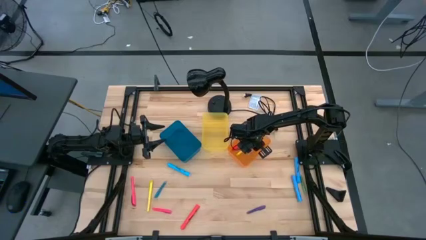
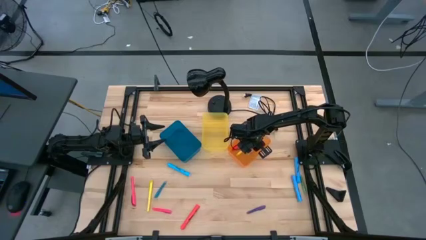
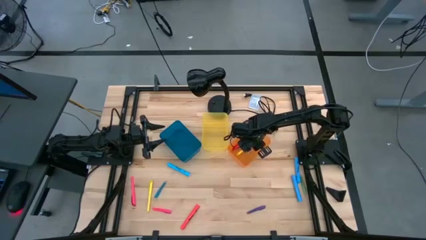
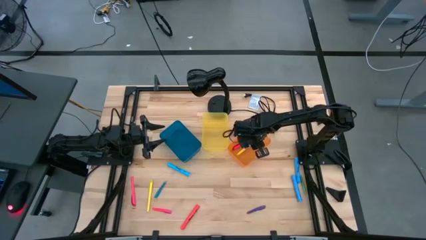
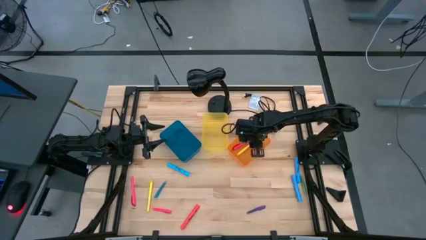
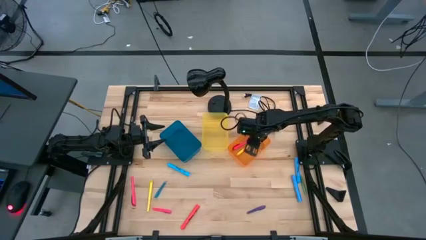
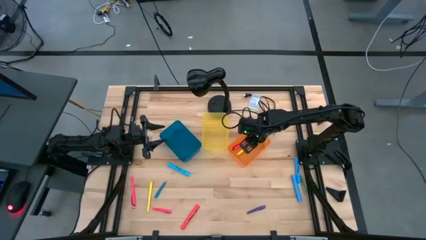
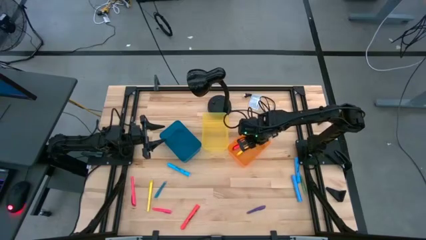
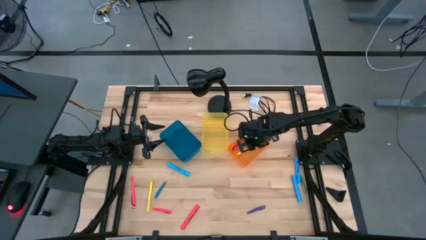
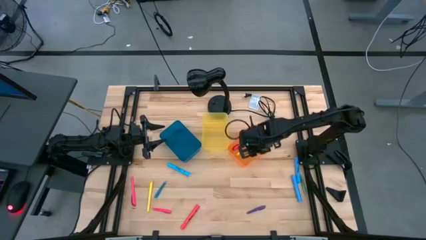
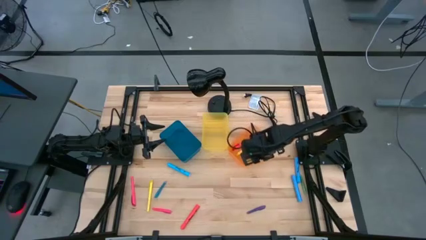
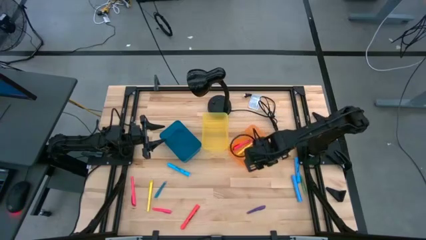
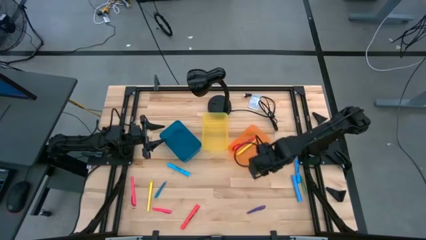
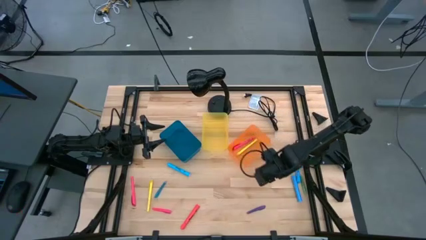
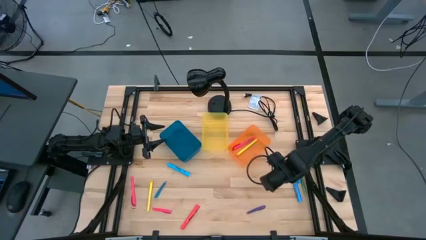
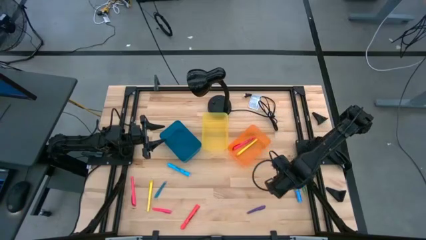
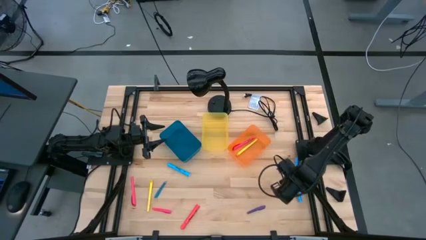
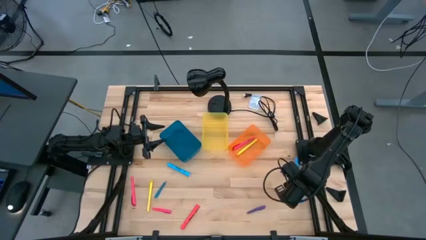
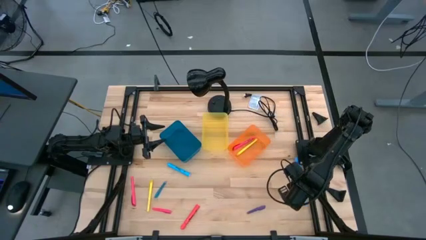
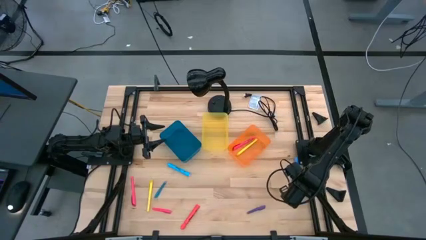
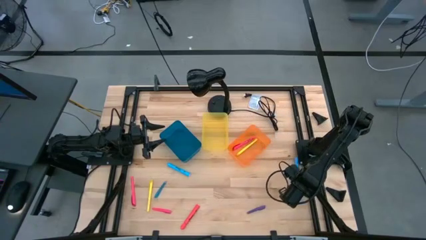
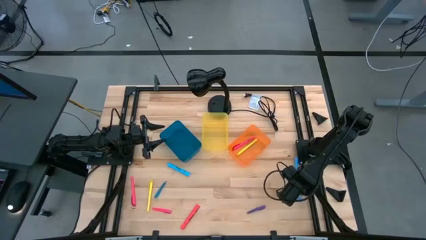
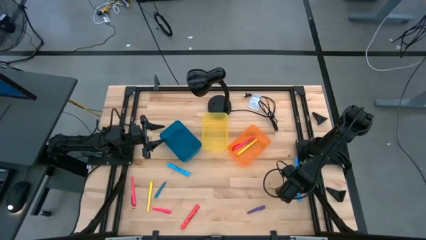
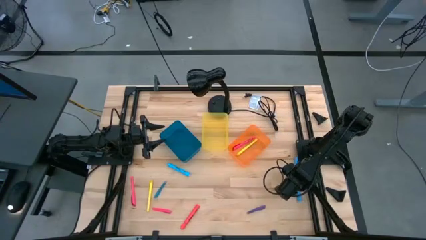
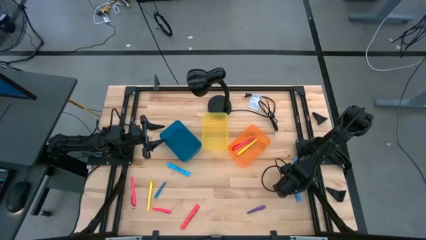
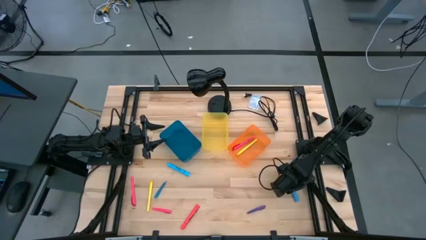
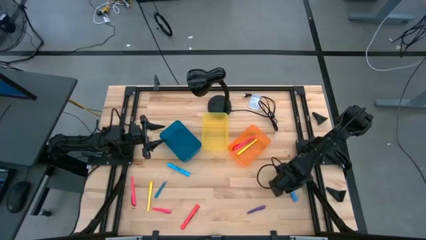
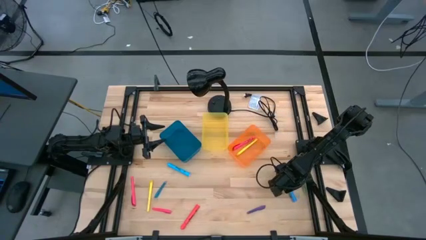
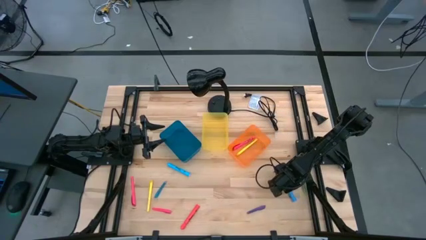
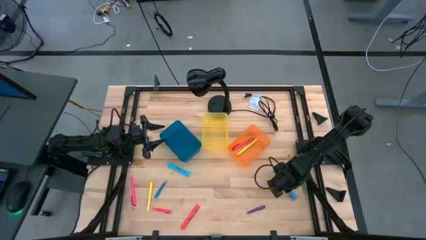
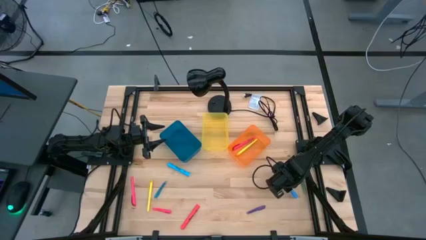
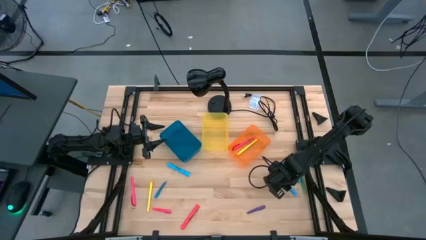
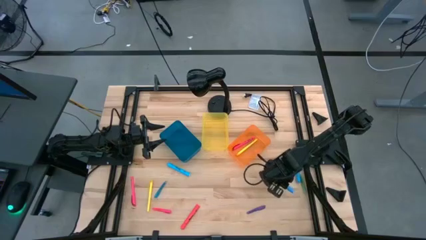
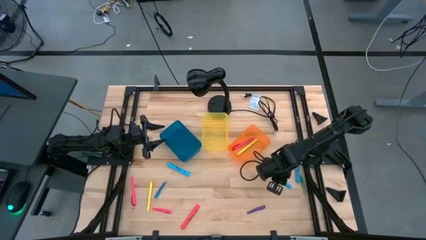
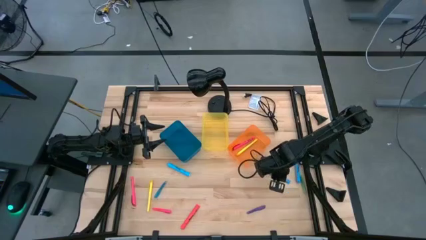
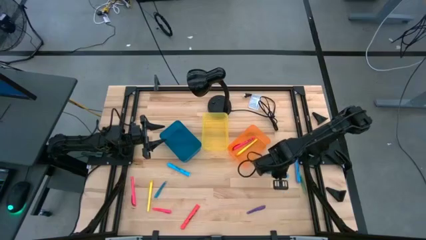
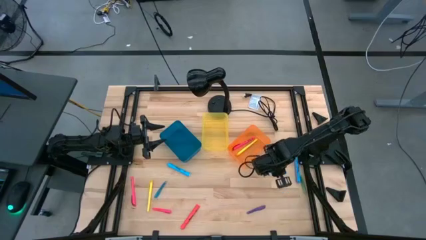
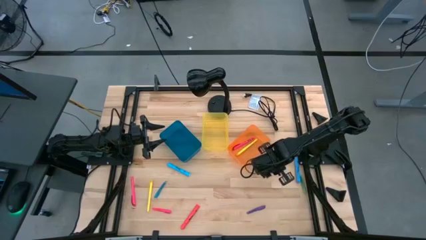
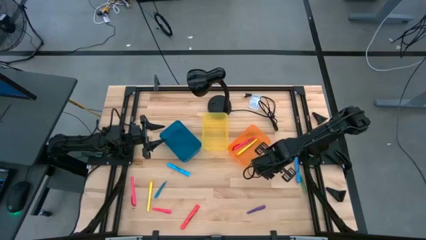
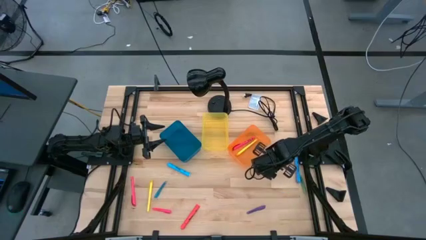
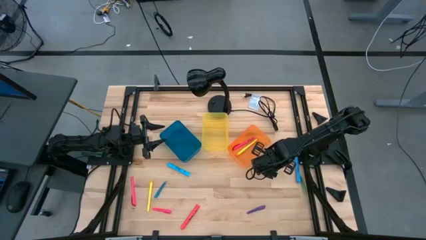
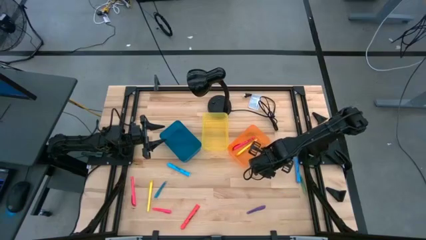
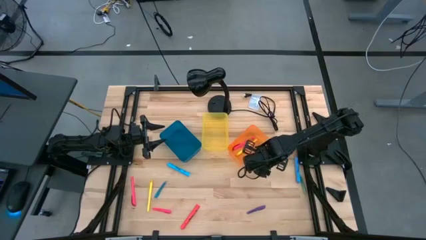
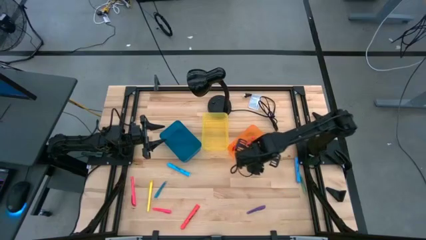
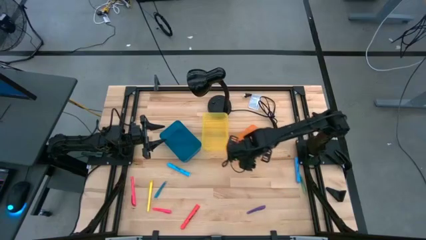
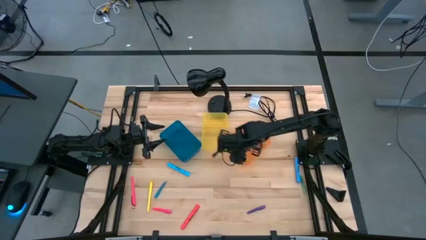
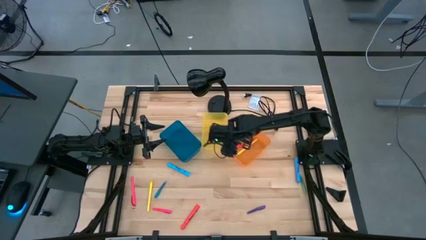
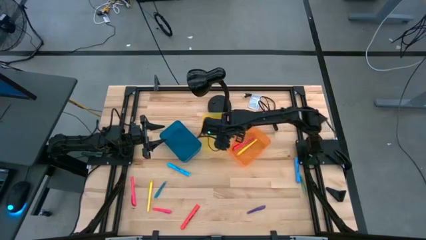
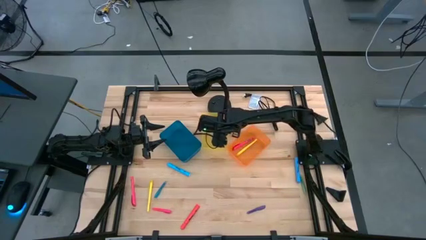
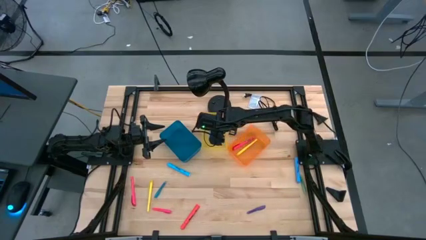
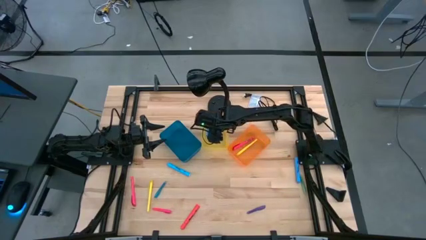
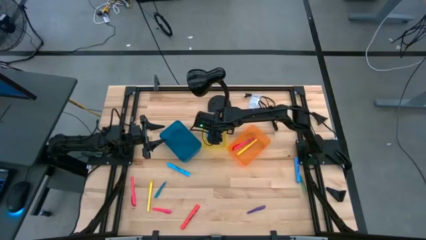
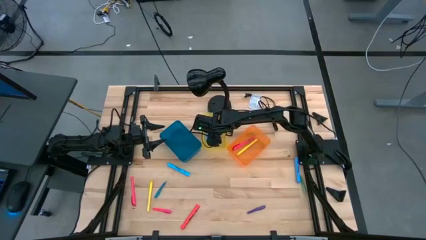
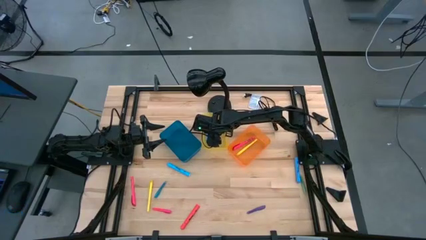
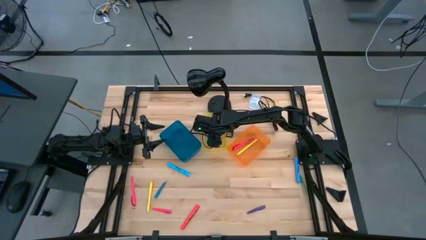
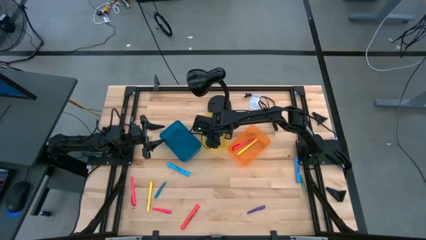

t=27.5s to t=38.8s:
Task: Pick & Place Markers
Put the middle blue highlighter pen into the yellow bin
